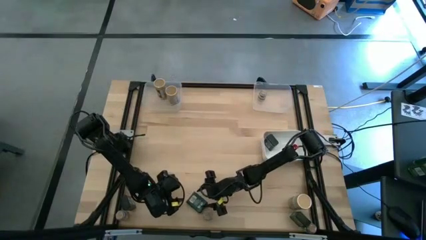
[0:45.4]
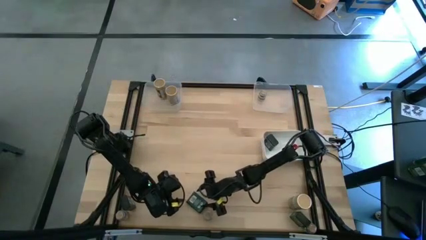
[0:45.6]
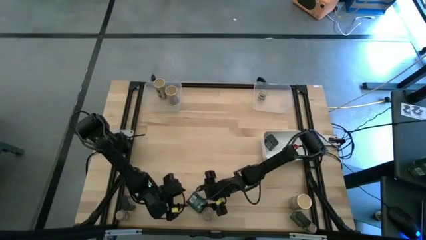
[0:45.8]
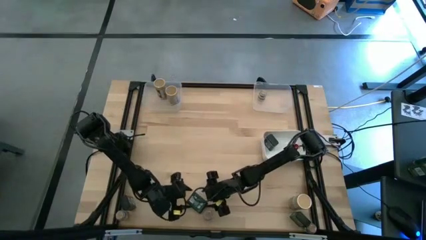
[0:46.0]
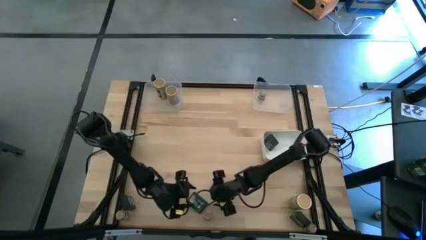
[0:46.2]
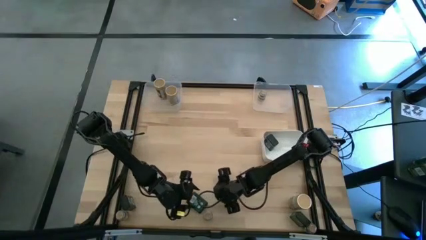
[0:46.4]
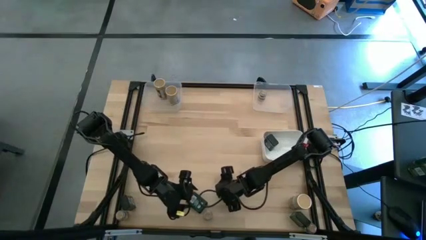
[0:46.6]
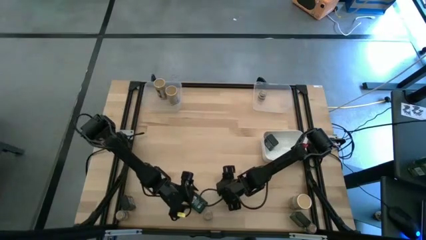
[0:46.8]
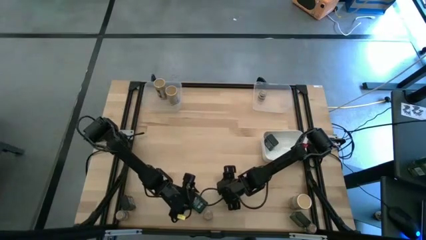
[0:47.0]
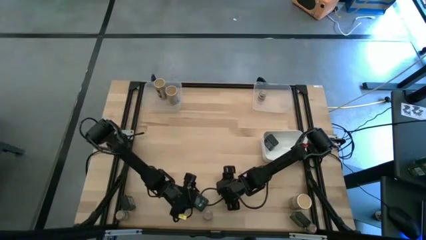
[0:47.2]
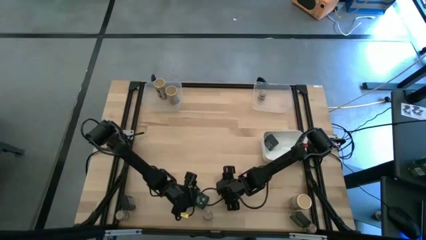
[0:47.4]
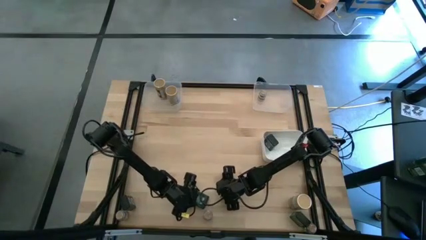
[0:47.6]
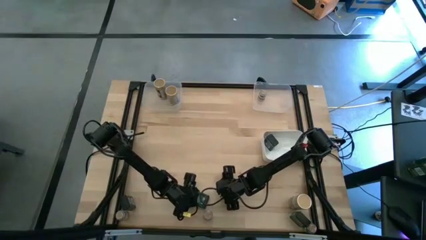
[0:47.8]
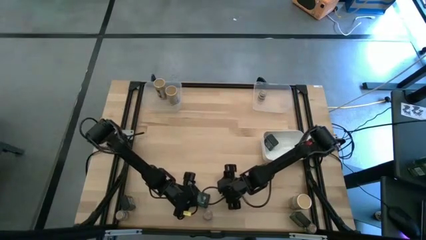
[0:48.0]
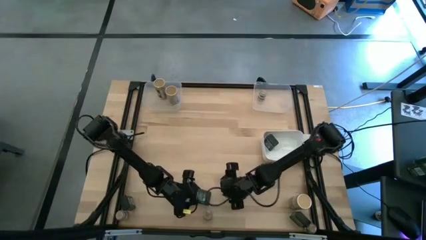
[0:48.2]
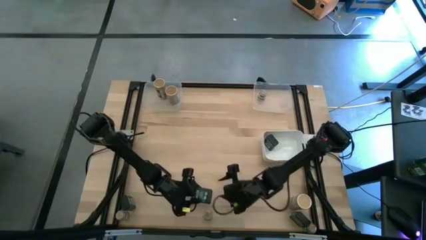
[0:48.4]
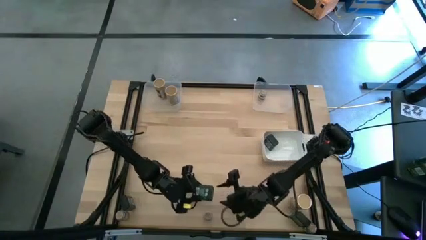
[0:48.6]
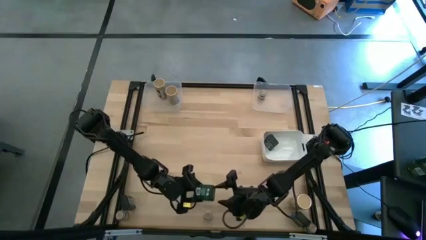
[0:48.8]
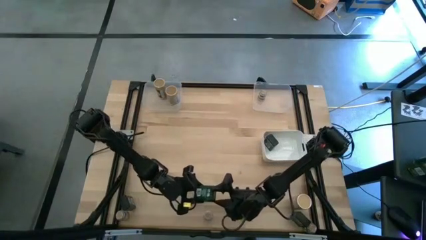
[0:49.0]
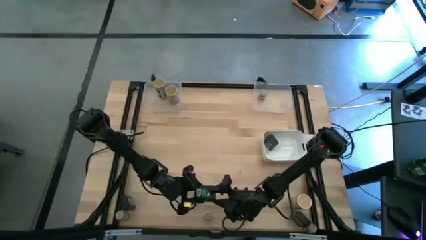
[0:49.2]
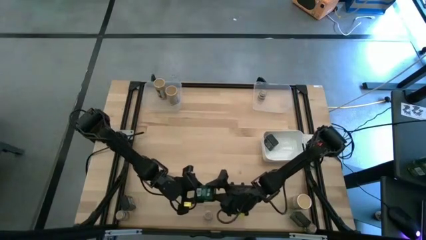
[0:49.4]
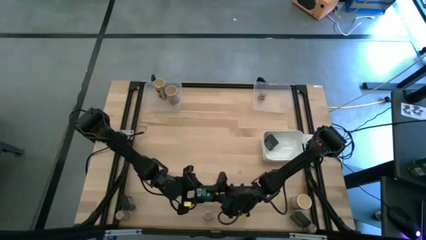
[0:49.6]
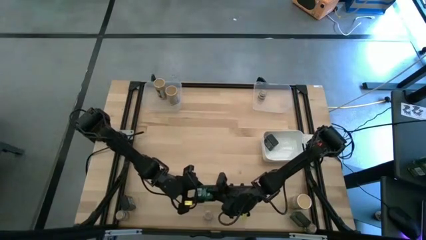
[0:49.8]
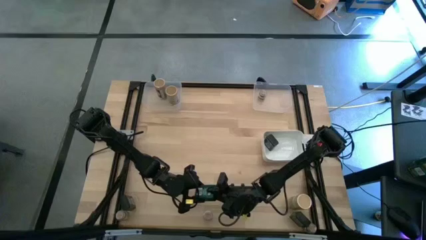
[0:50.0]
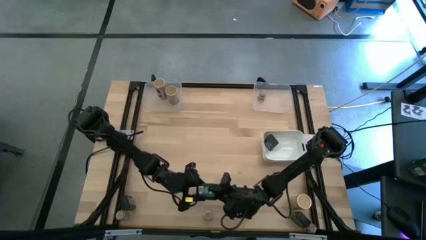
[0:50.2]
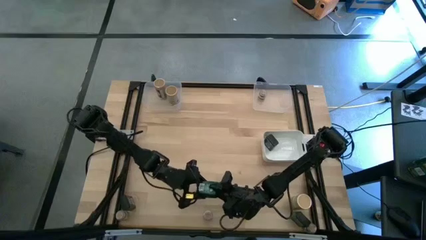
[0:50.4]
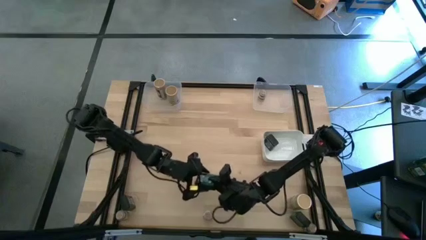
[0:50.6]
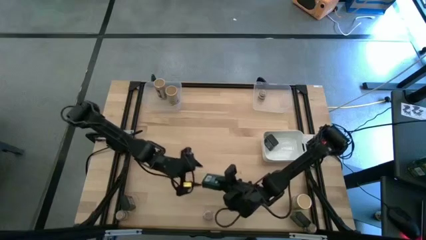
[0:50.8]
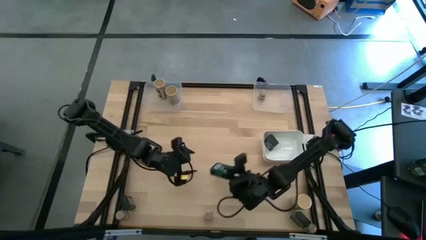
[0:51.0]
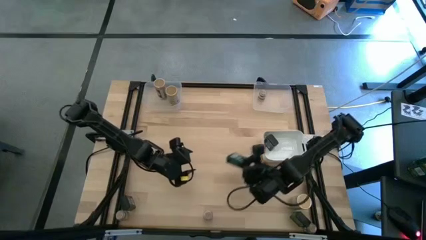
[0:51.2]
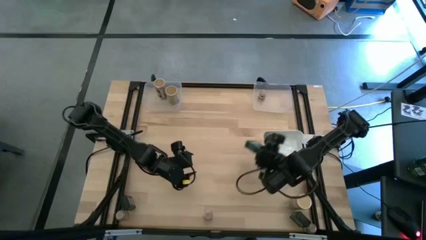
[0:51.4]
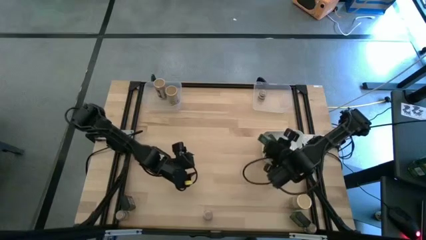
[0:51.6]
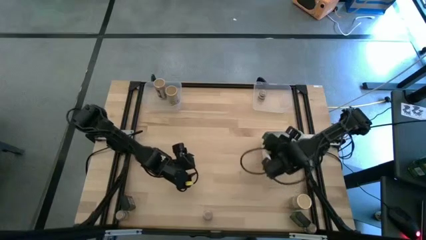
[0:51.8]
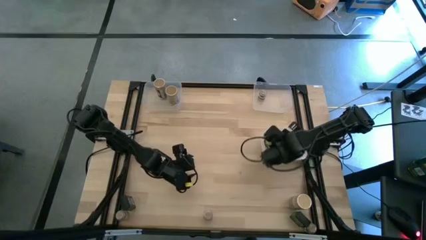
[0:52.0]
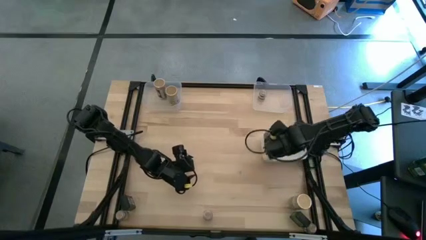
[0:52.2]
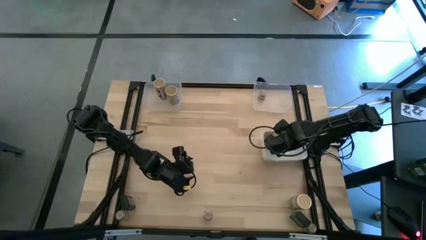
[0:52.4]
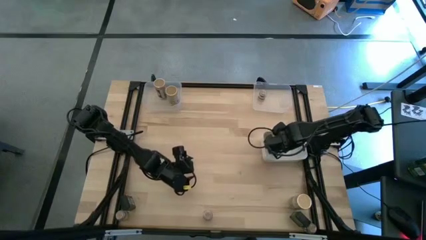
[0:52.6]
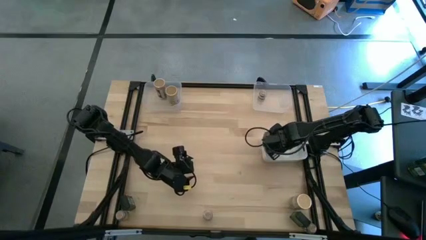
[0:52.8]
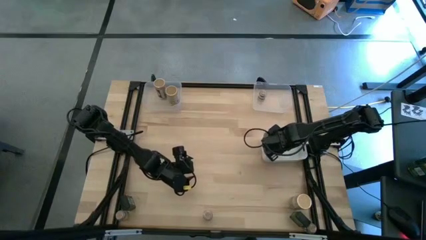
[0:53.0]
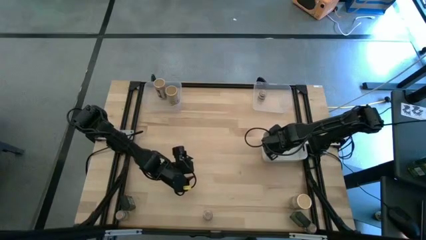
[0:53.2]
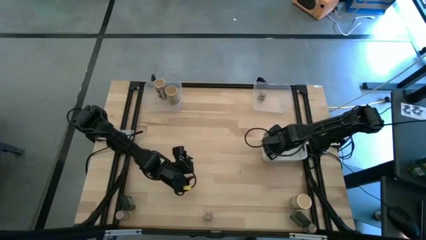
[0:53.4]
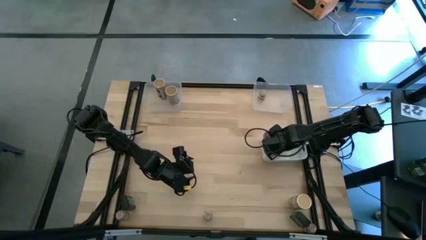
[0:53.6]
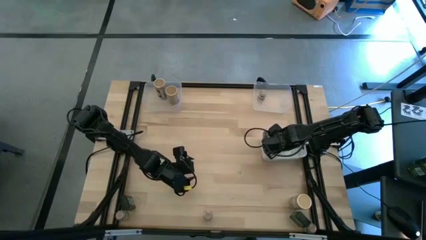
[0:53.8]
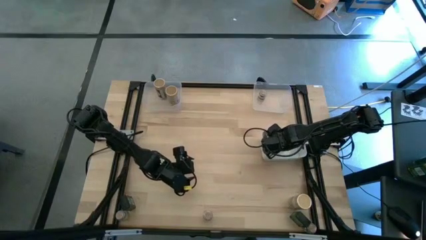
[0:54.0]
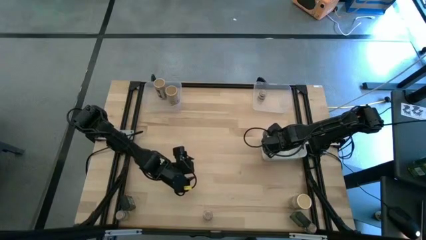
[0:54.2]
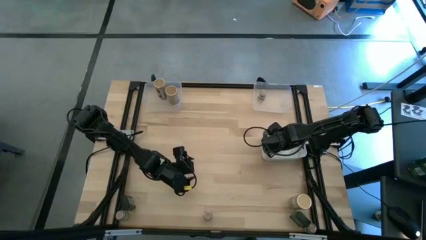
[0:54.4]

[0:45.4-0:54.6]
Task: Sort spices by type
Put the middle black seasoning can into the white bin

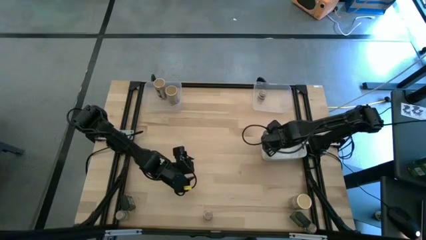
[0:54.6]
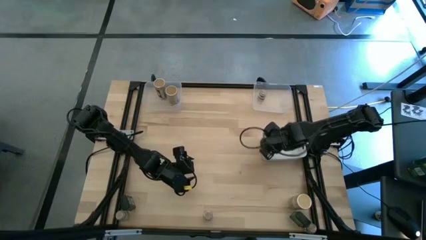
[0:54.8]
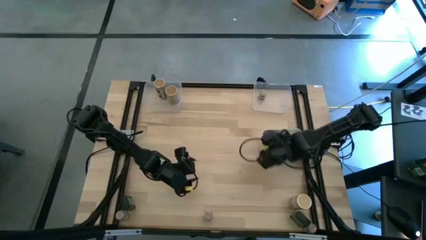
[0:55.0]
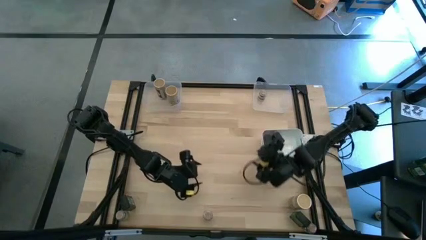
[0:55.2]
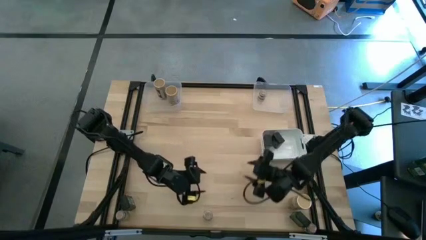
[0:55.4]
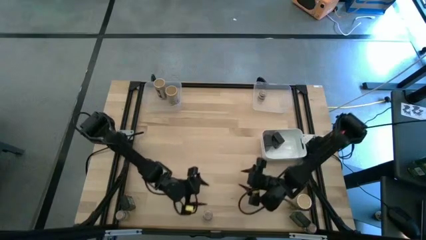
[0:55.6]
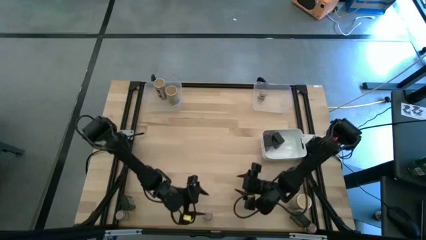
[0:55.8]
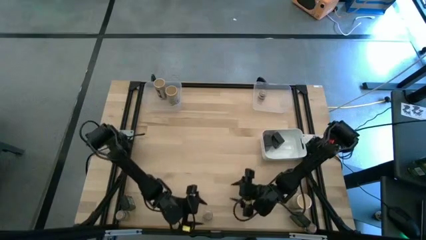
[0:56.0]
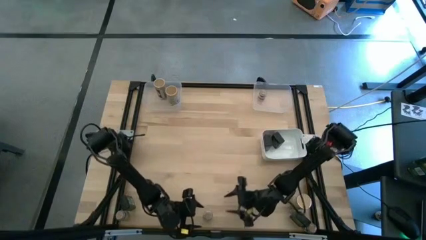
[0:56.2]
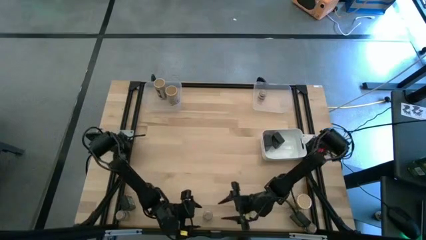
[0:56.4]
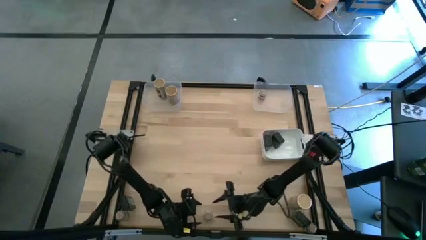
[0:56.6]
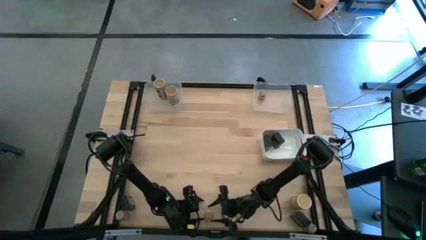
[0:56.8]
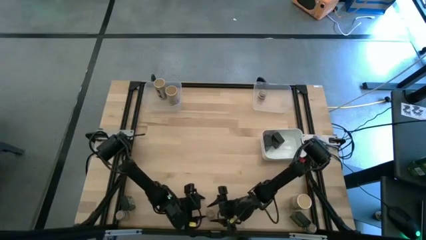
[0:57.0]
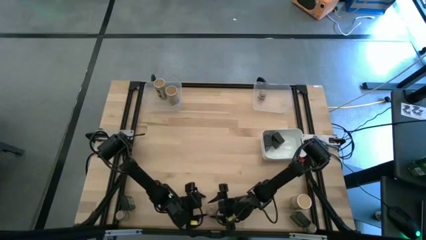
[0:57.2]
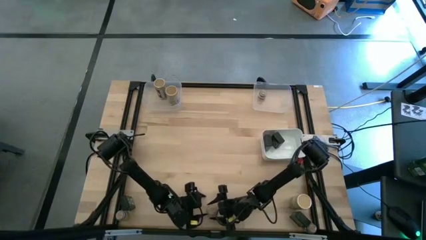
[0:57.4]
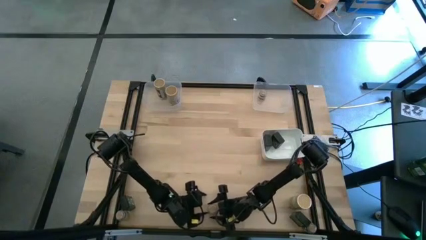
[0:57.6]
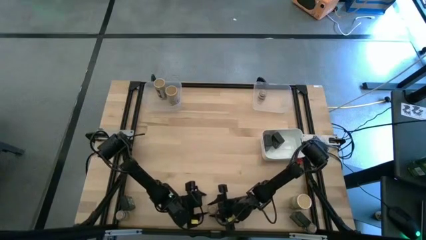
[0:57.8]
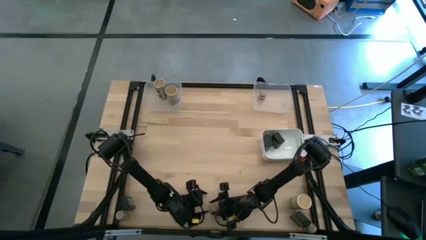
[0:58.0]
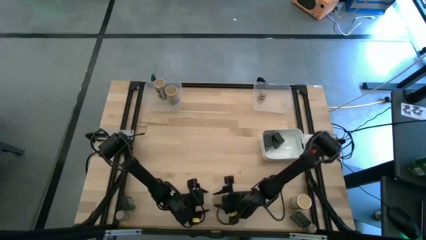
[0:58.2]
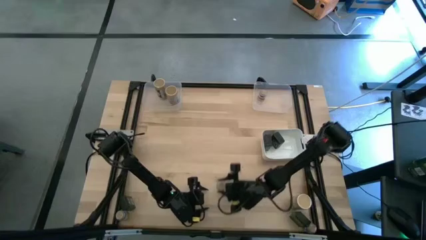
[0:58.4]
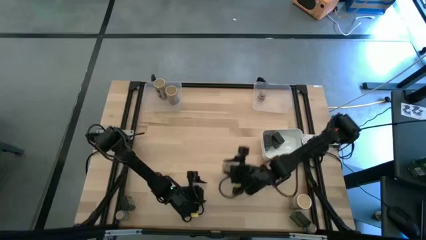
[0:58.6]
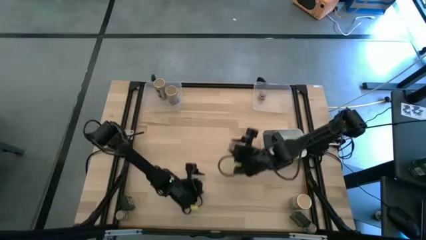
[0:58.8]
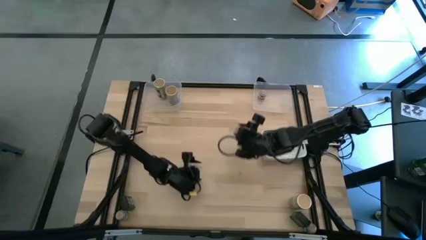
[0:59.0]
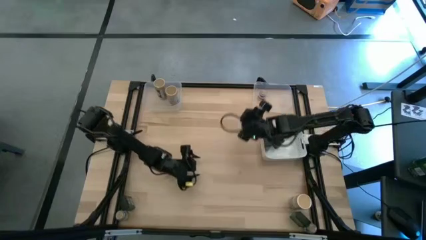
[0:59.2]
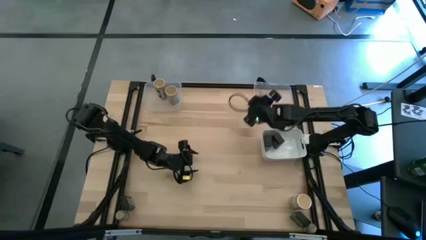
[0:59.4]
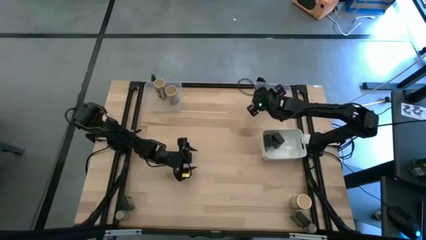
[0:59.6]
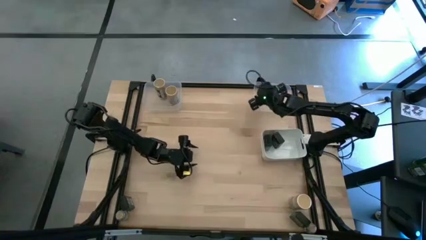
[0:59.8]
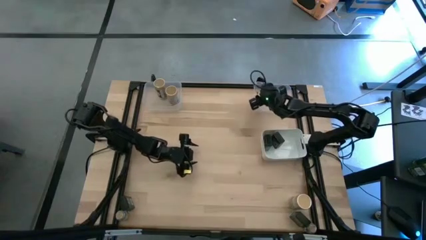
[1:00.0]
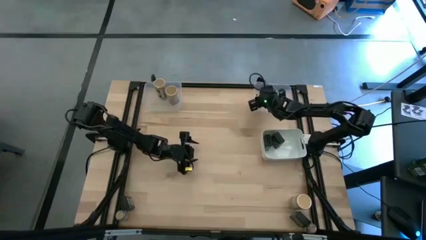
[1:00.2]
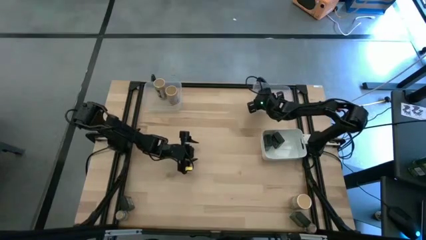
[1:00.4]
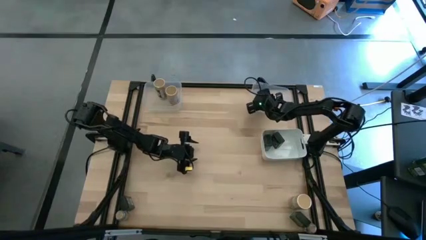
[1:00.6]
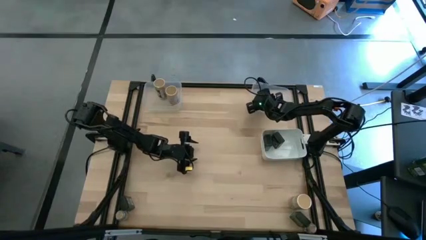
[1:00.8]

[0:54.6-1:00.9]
Put the middle brown seasoning bottle into the right transparent bin

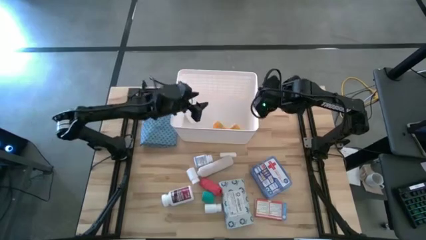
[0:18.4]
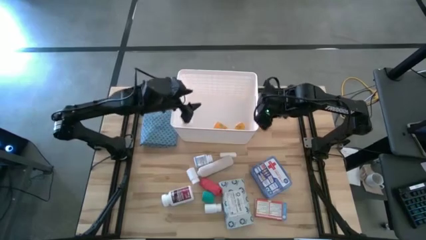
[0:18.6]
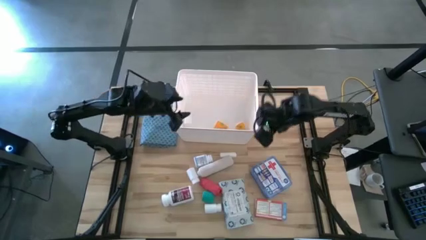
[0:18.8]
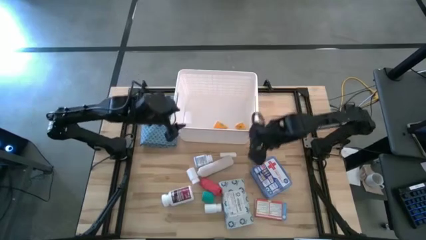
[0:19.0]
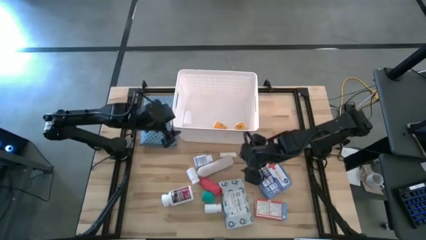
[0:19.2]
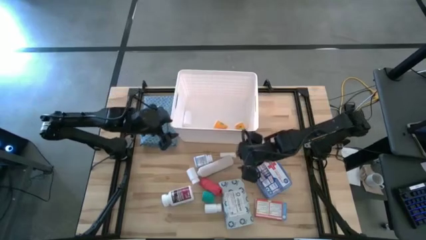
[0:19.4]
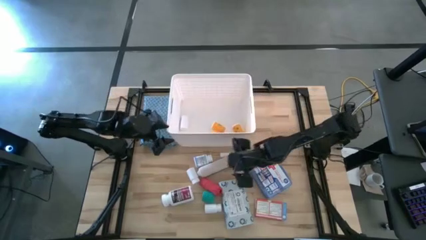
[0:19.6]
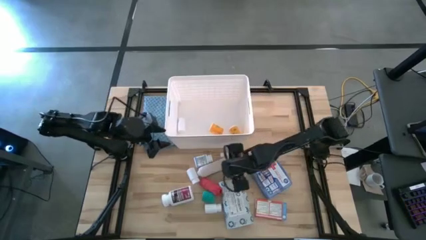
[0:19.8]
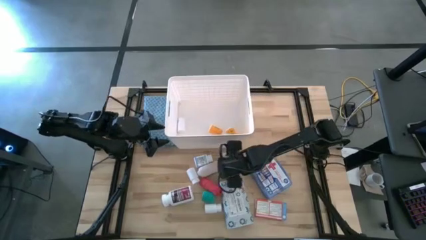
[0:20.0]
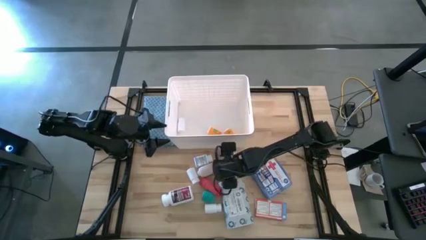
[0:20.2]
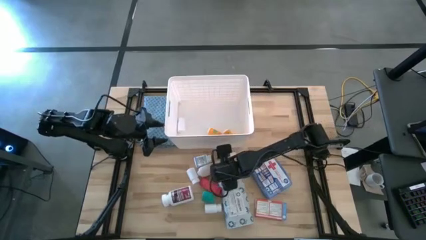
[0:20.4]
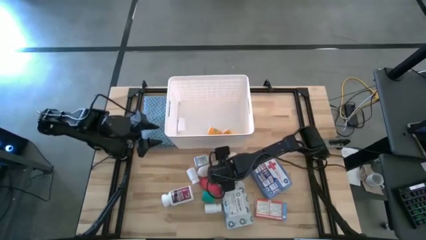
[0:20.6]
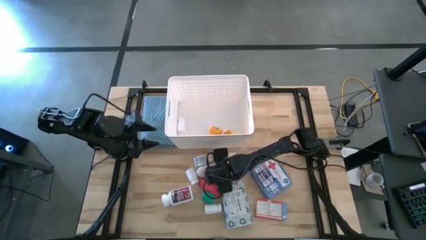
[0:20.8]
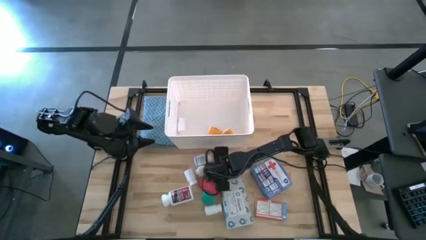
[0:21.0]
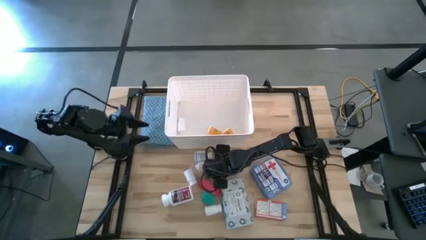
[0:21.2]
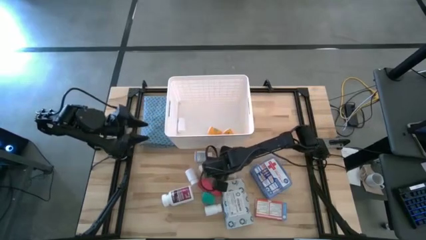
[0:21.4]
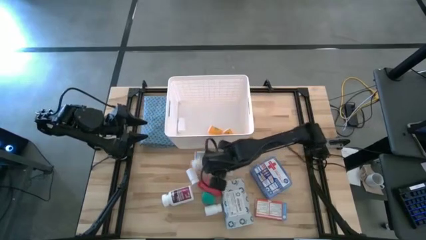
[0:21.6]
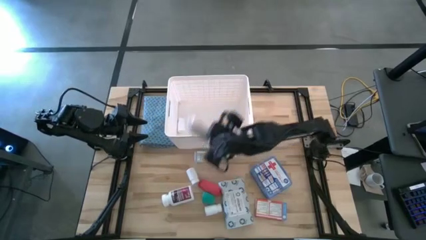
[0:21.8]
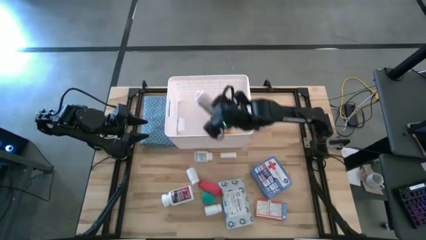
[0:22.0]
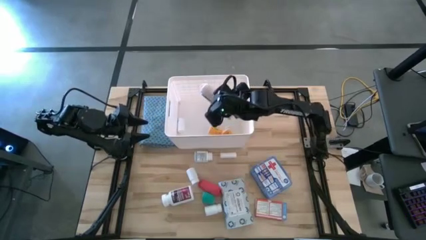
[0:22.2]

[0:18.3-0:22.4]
Task: Pick & place medical supplies in basket/bin
Put the rolled white bandage into the white container
